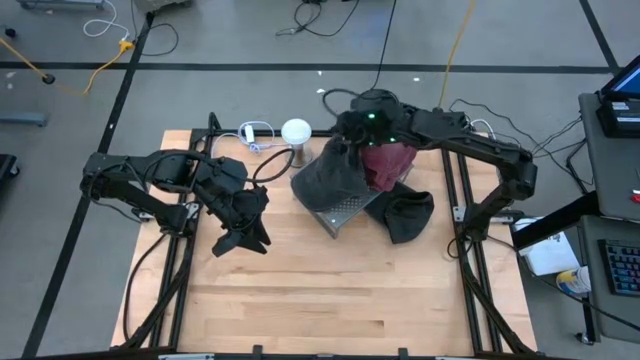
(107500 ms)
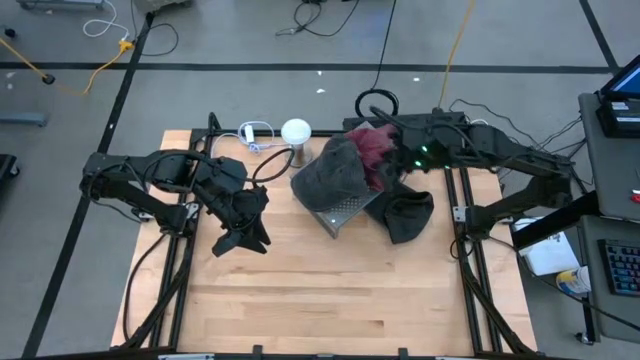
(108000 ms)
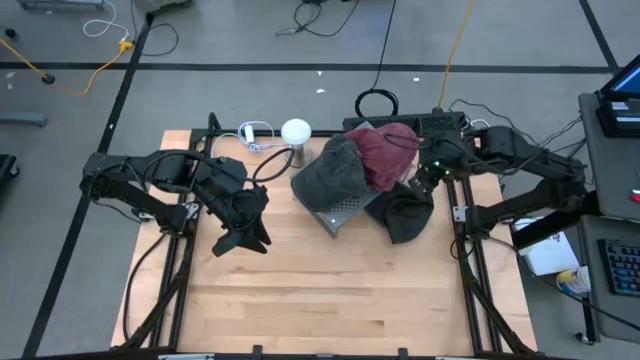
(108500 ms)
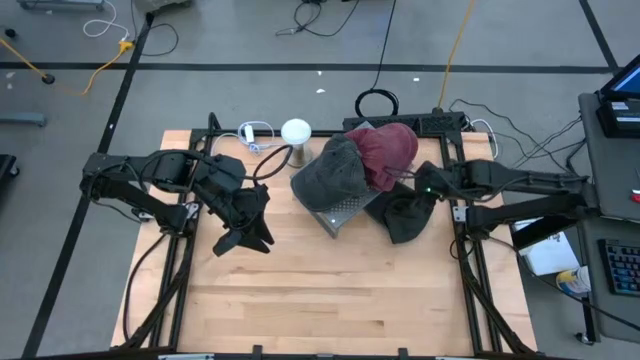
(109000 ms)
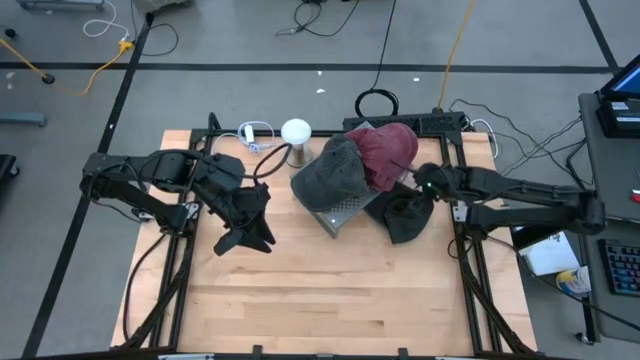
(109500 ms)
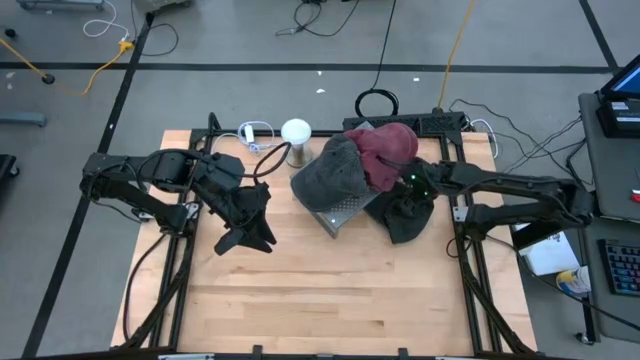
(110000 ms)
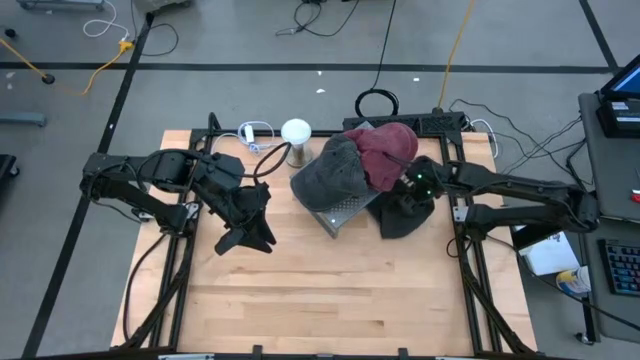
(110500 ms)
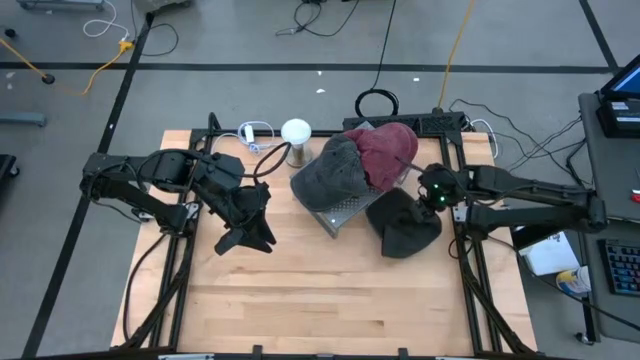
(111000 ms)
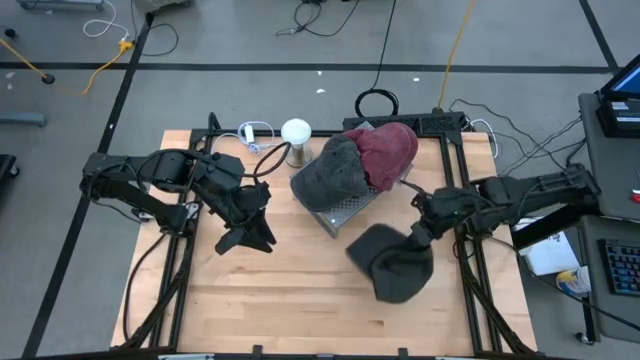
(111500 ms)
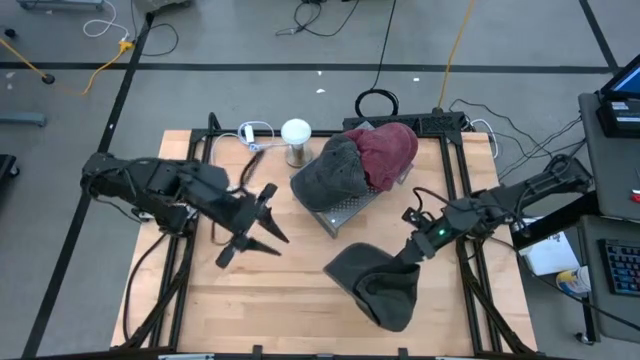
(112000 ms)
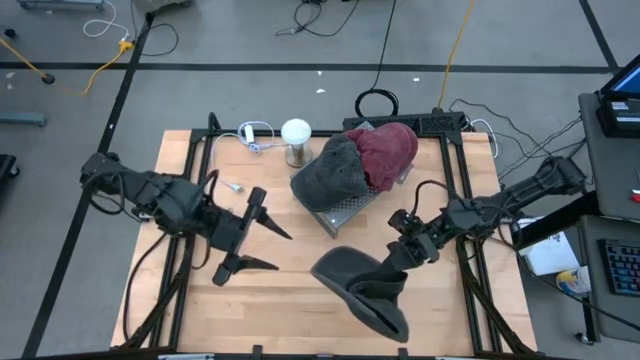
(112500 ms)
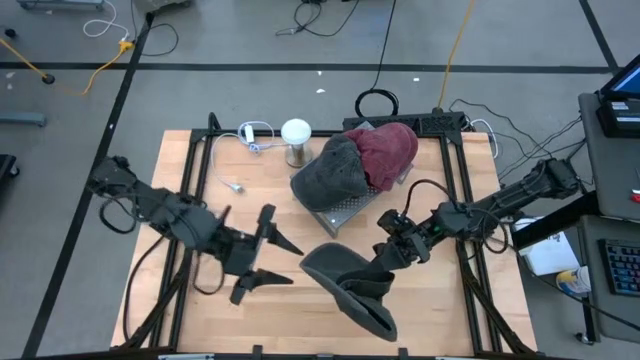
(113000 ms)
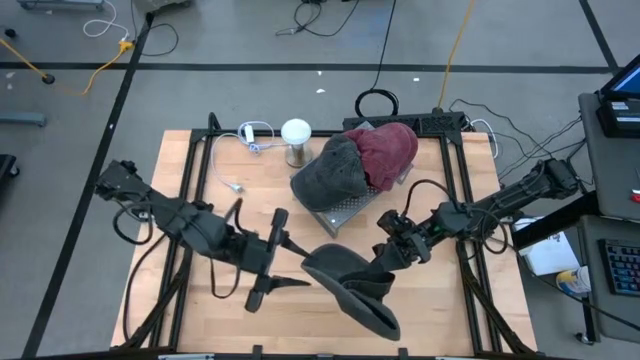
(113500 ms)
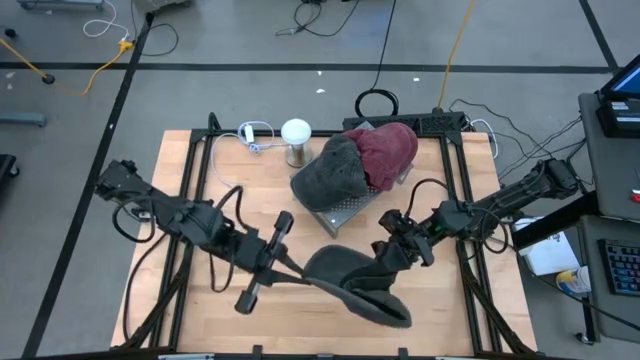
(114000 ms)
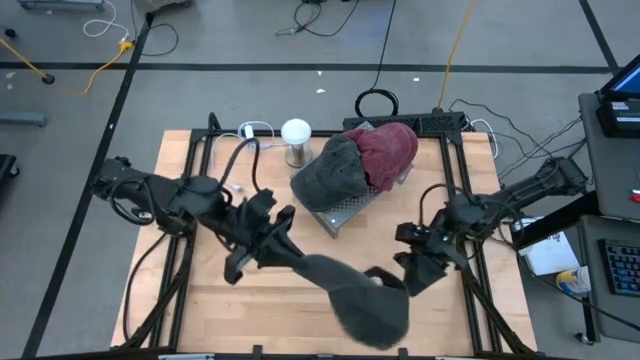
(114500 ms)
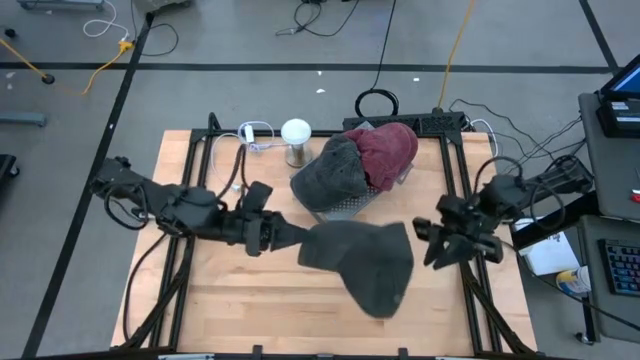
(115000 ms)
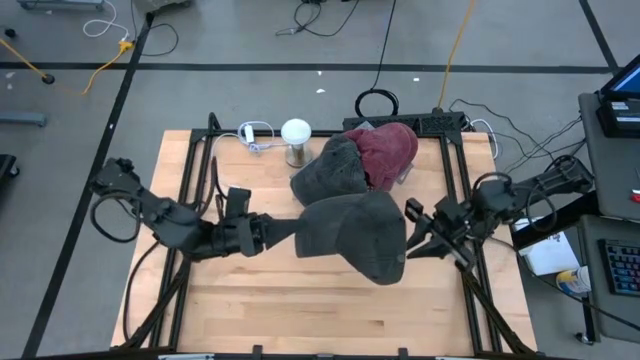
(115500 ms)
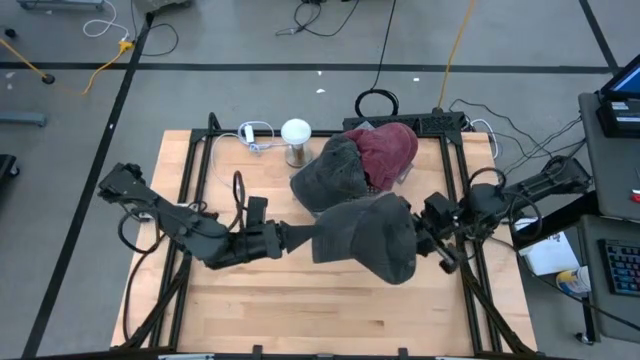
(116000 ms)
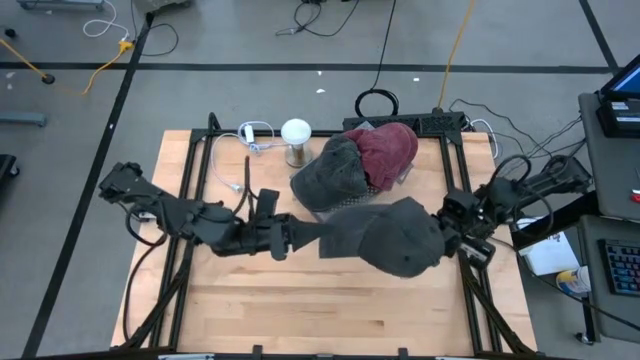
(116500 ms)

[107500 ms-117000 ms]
Task: Pick & Place hat
Prepare the black cap

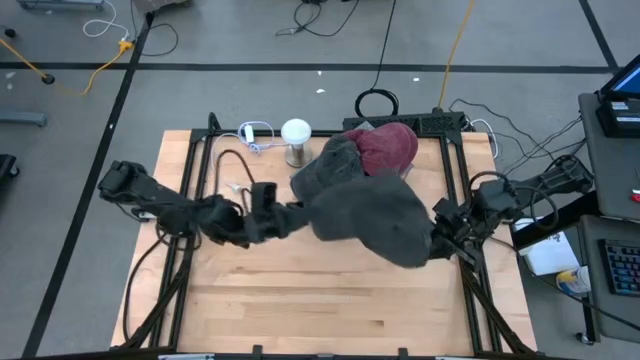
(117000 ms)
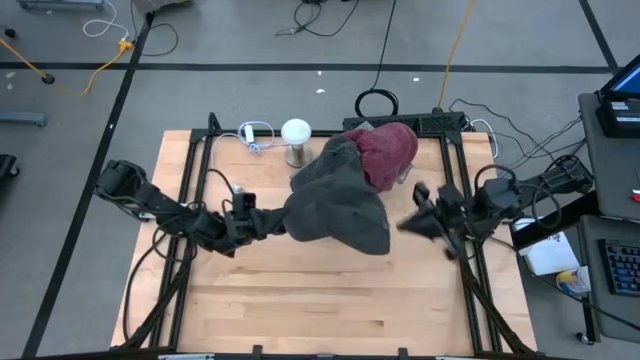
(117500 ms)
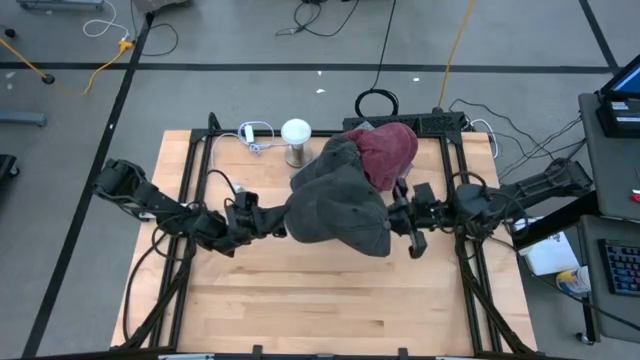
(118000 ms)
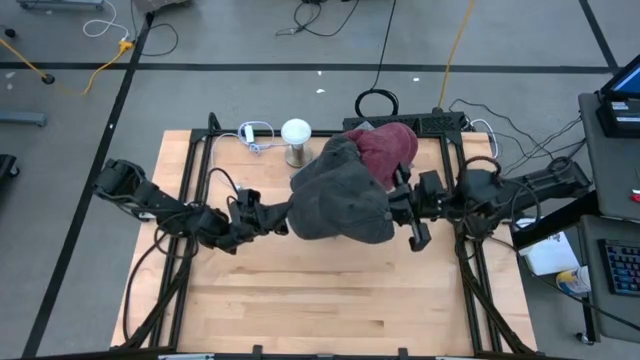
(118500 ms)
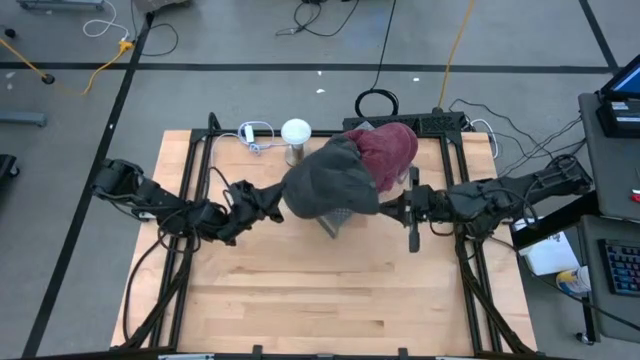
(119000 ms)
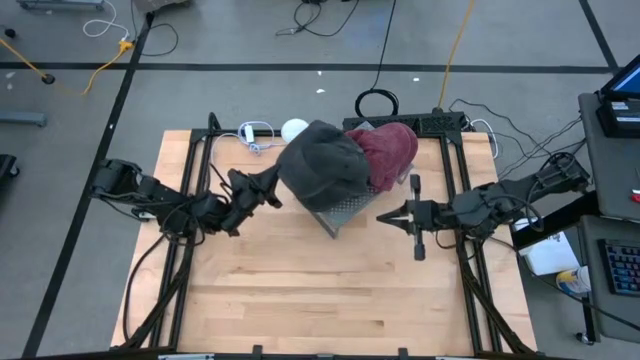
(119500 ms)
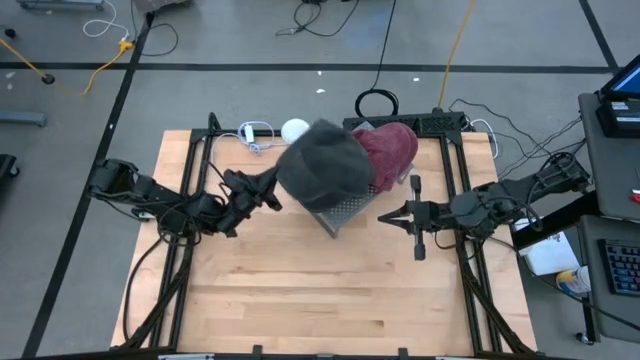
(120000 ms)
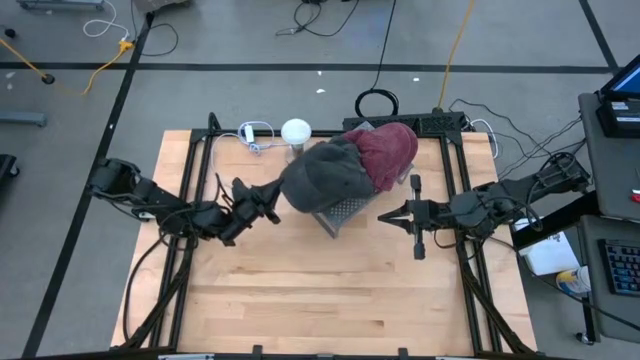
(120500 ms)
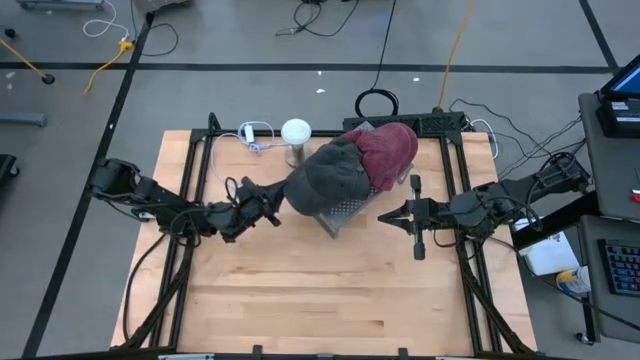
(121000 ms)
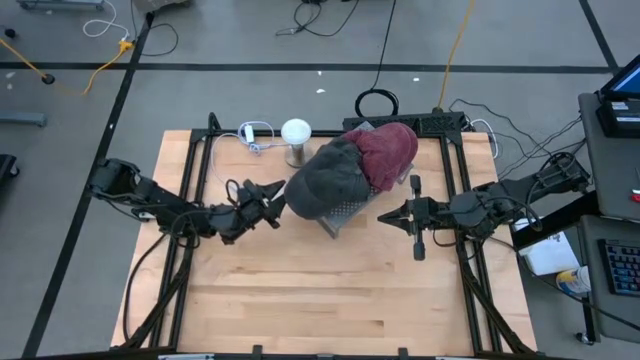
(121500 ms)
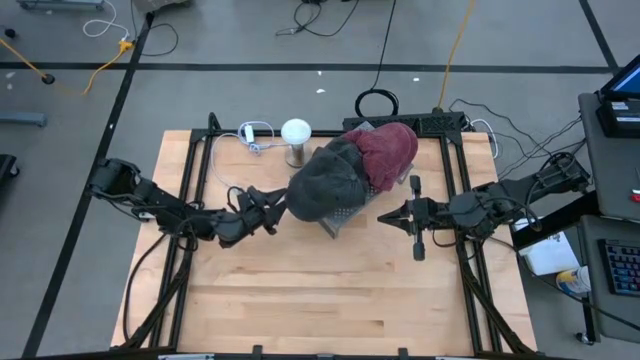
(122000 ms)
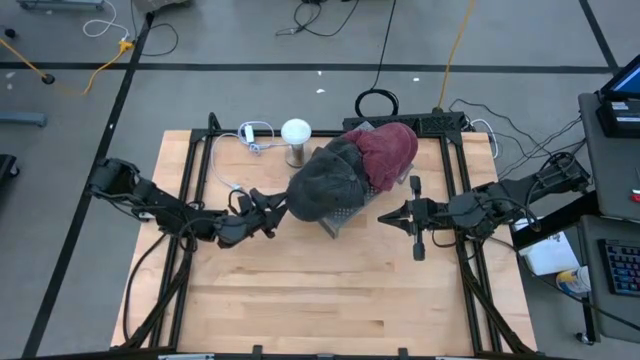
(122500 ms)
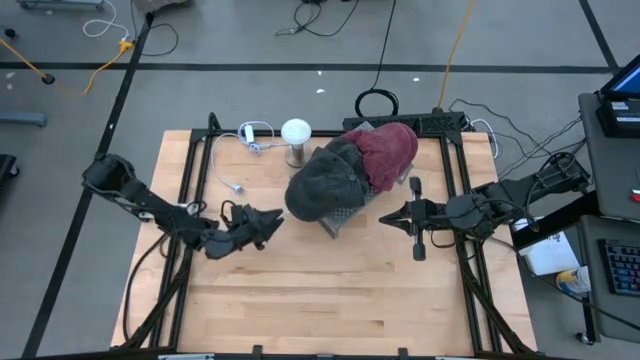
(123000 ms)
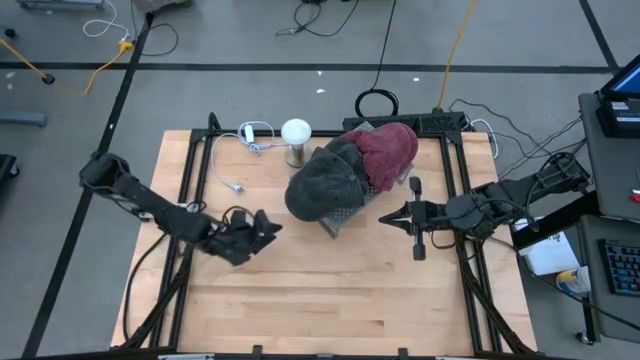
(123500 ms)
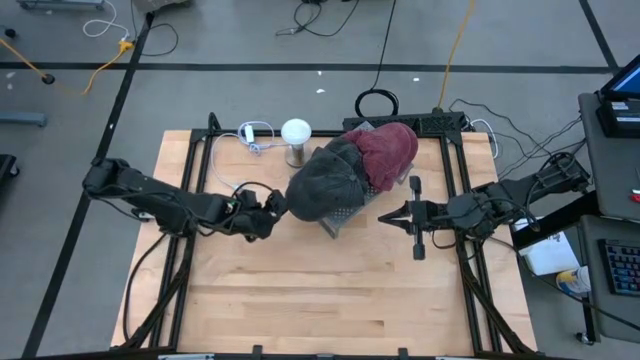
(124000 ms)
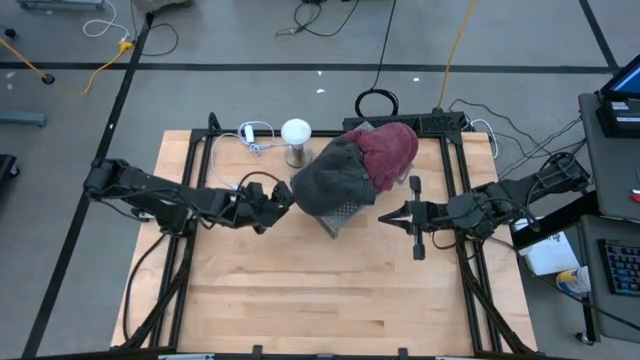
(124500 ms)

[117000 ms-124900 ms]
Stack the black cap on top of the black cap on the shelf

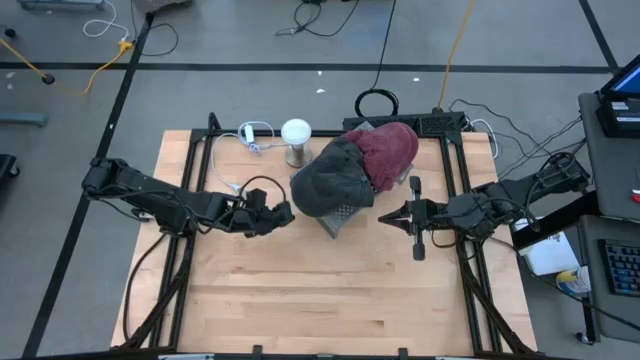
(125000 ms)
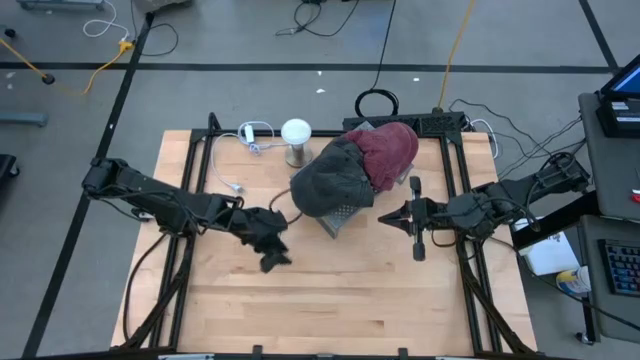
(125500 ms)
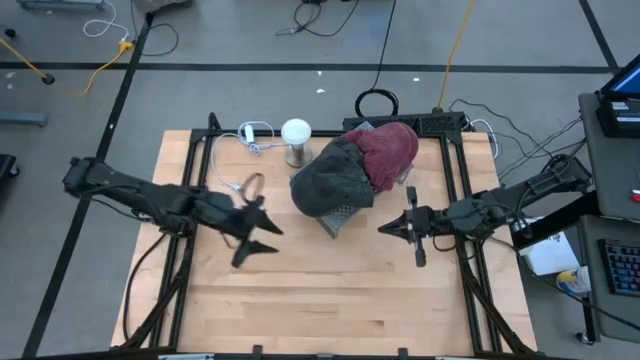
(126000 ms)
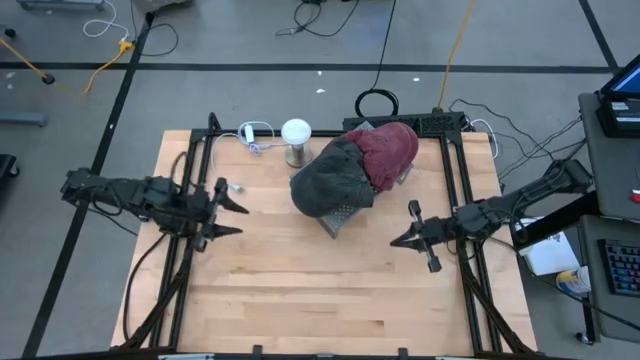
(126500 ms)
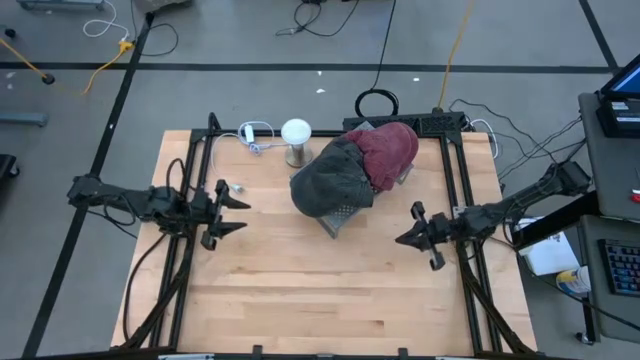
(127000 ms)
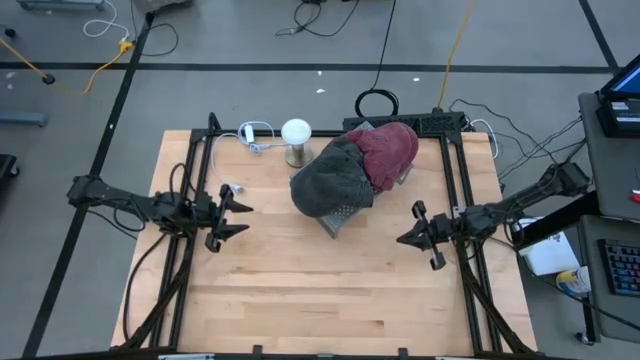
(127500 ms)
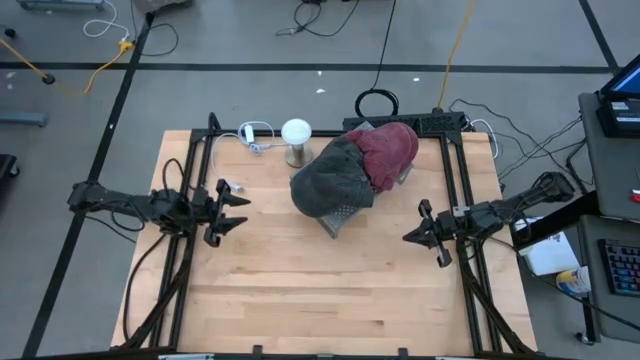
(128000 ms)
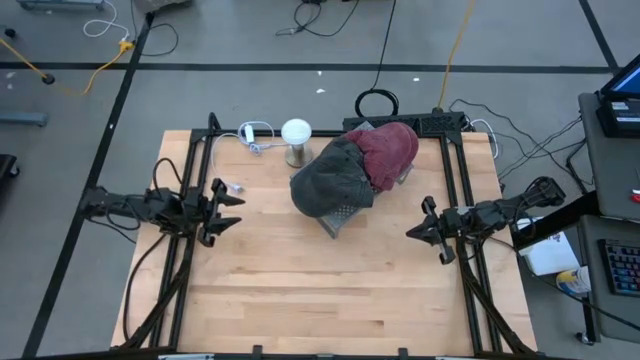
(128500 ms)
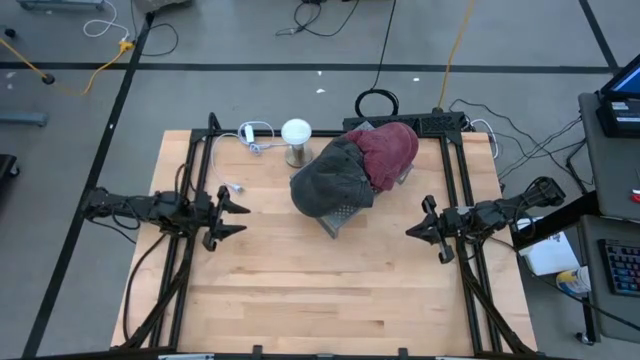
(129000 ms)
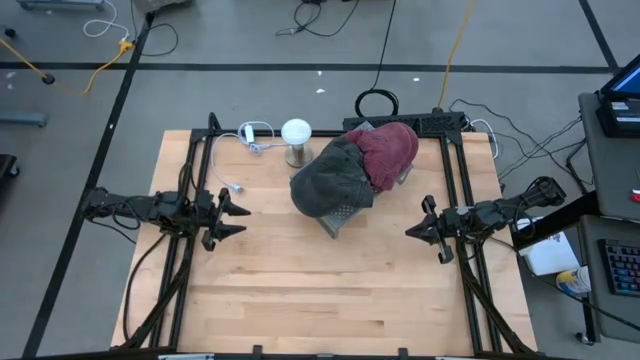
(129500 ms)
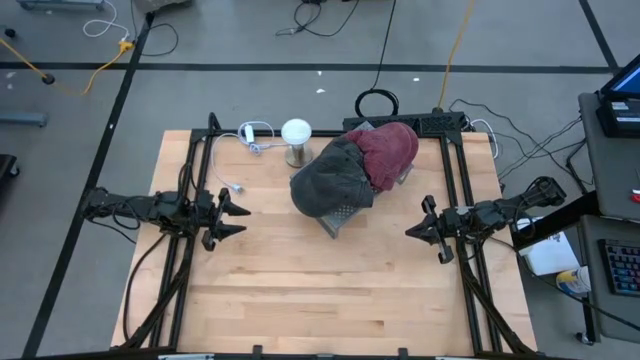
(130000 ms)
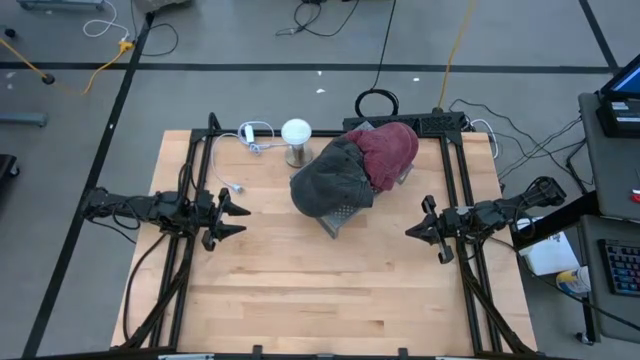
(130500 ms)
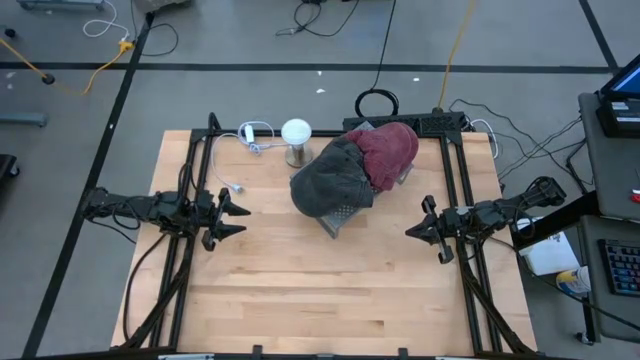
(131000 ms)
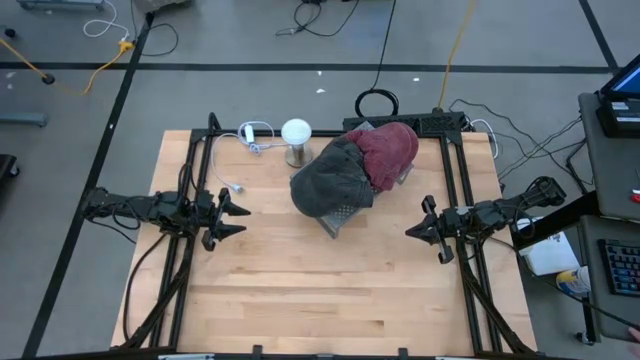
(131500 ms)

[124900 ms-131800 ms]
Return to Home Position
